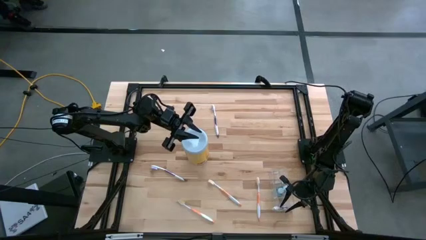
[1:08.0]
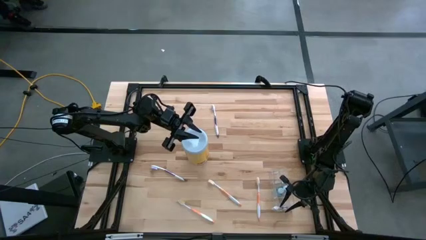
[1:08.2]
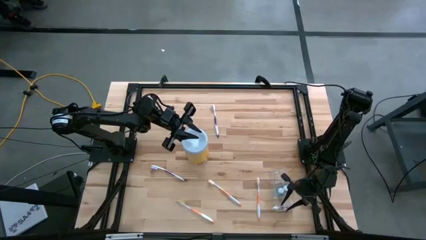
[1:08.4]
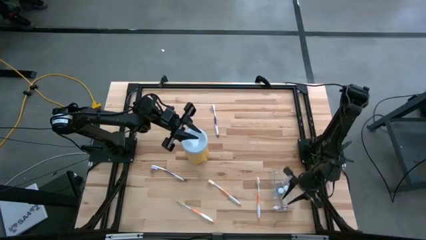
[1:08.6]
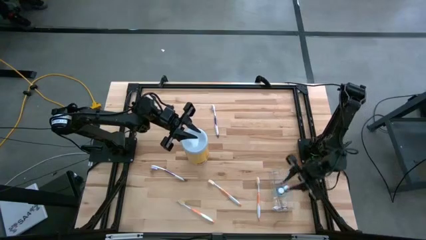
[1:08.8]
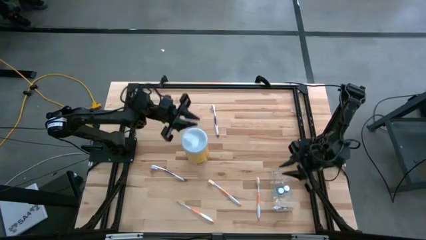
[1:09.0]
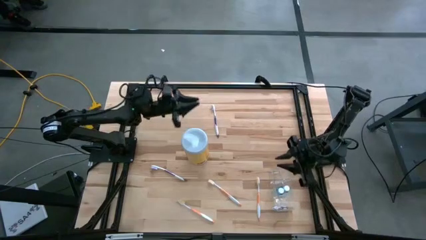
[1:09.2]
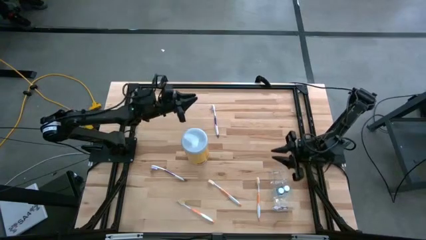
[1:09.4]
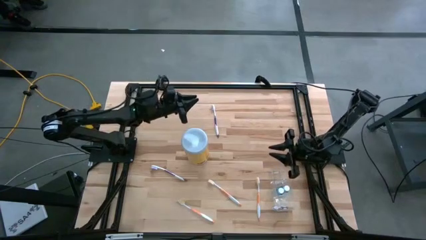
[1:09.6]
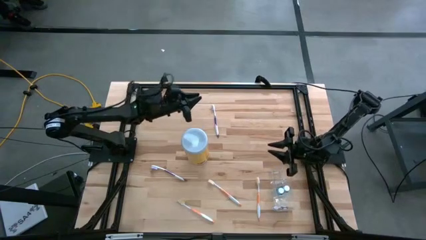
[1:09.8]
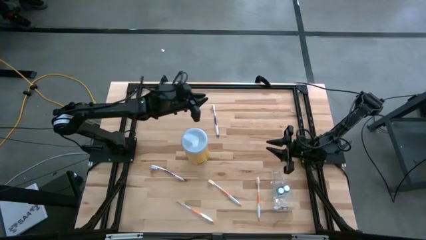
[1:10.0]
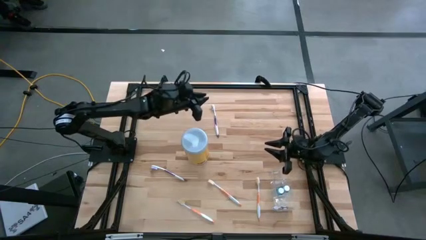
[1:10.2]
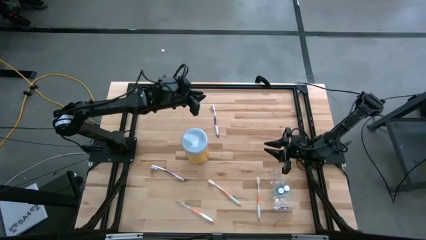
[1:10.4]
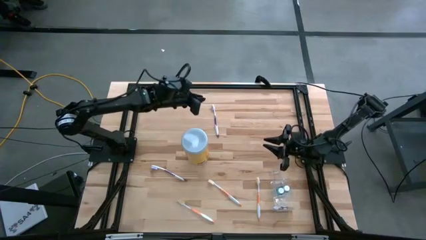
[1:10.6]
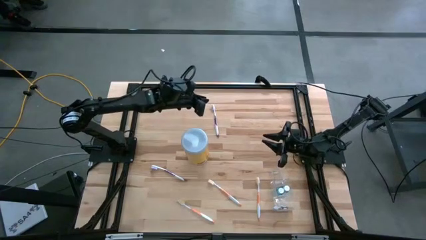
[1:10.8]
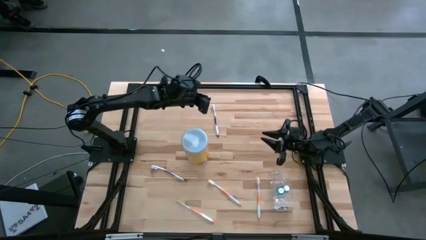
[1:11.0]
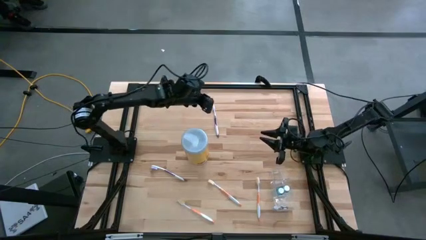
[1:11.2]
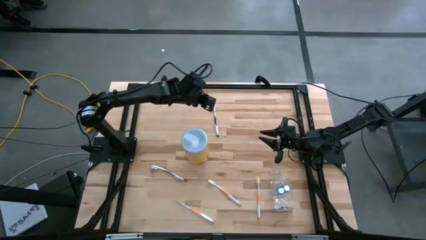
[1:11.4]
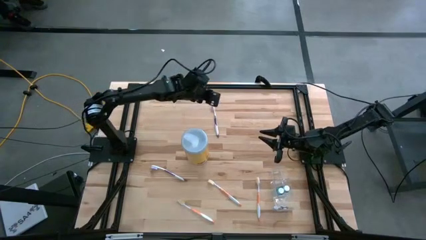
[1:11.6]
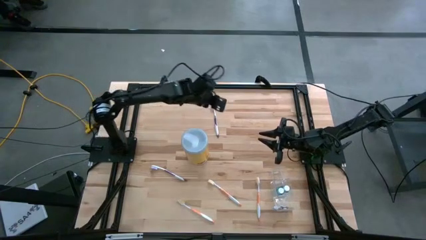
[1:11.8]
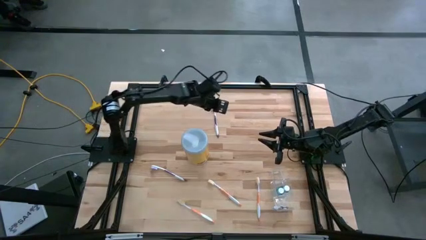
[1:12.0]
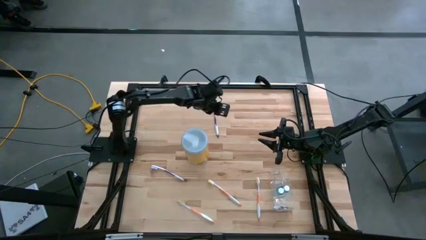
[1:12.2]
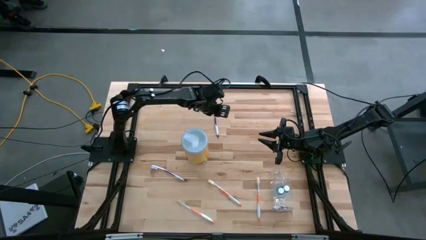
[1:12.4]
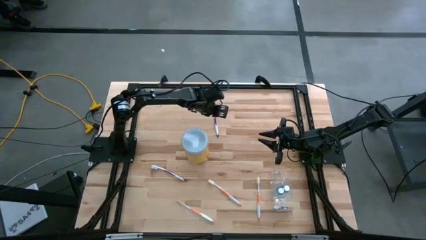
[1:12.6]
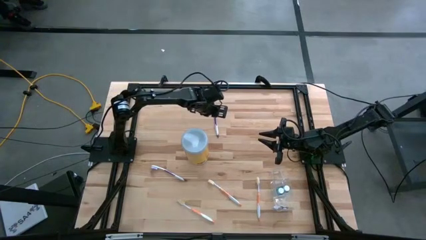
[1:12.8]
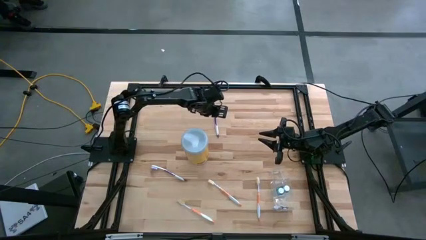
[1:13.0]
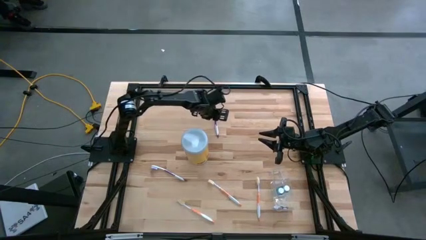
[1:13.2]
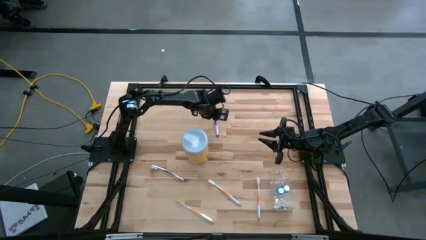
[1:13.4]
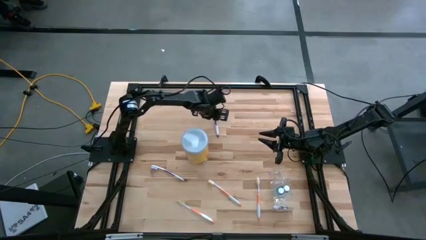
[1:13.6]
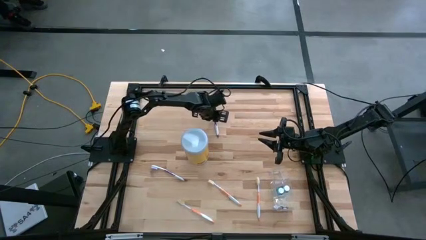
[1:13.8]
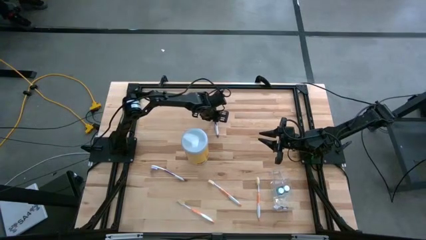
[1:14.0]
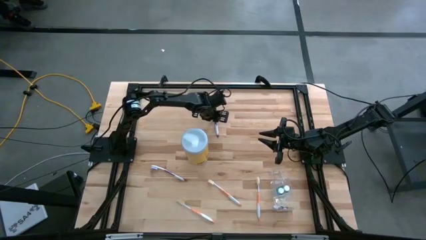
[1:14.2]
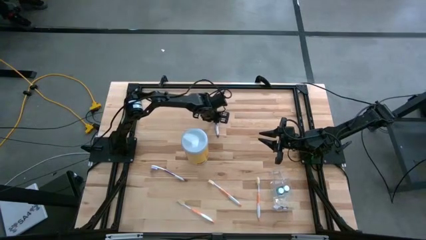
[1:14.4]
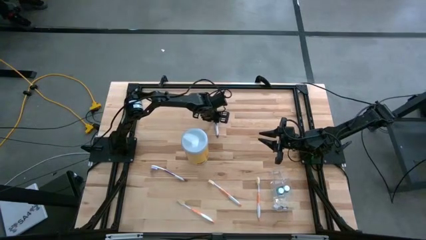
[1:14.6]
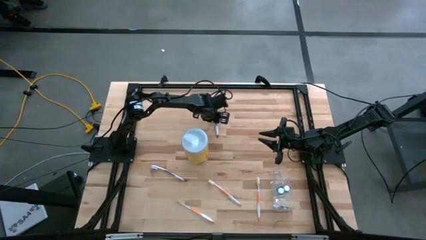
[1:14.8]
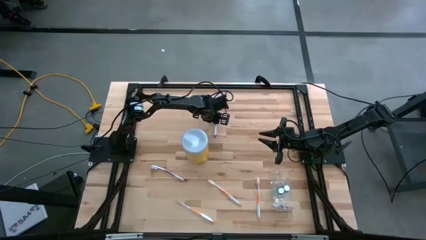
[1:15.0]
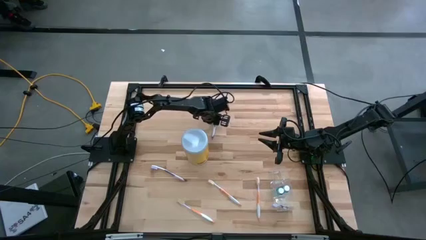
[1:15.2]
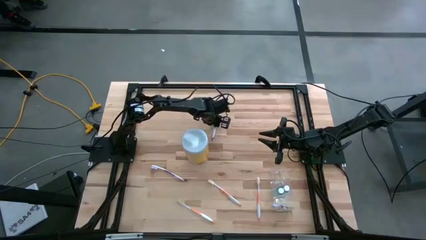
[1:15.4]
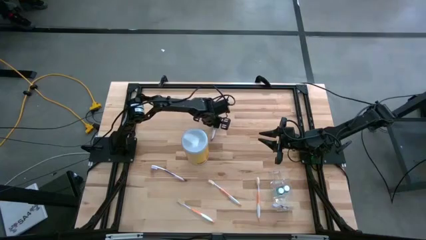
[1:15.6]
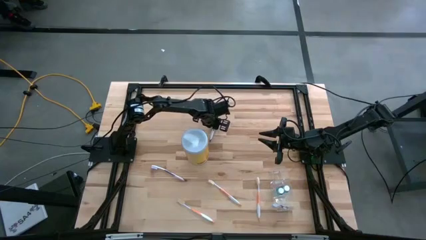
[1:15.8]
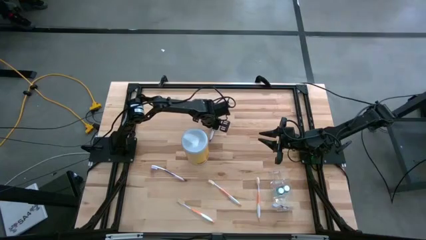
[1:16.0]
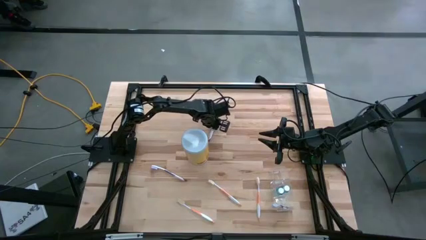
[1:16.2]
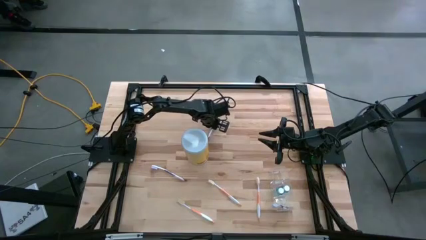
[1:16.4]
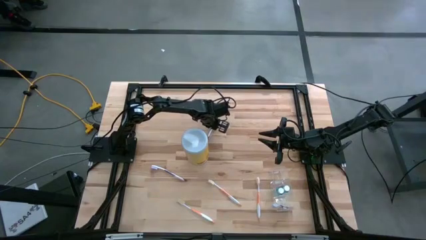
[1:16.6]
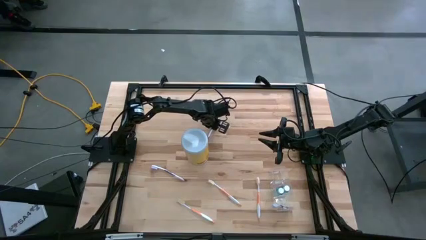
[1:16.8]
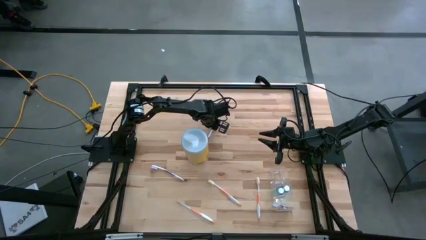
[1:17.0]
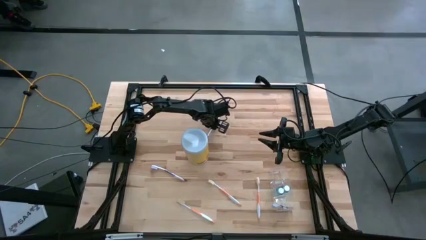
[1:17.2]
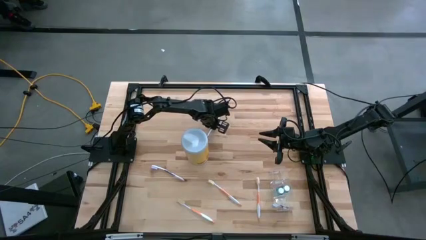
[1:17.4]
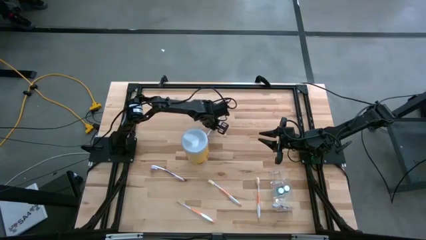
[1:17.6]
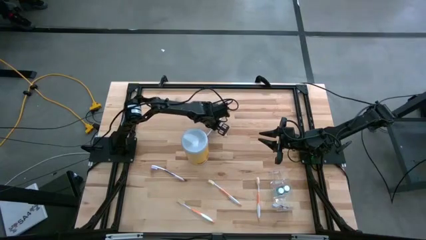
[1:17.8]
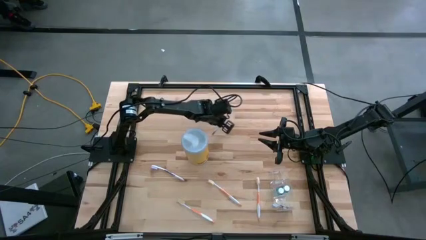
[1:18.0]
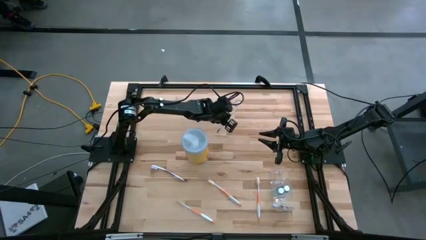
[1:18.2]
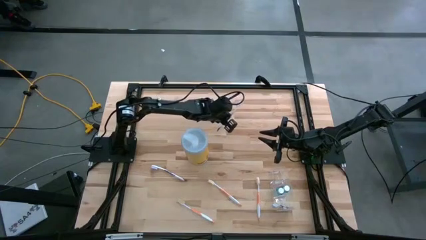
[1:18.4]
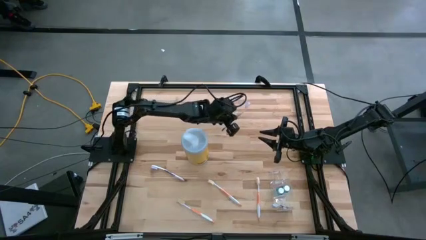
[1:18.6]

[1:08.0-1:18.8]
Task: Pick & Place toothbrushing station
Put the top purple toothbrush in the bottom section of the transparent organizer

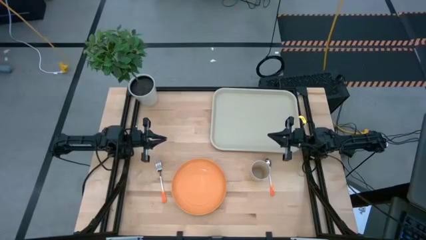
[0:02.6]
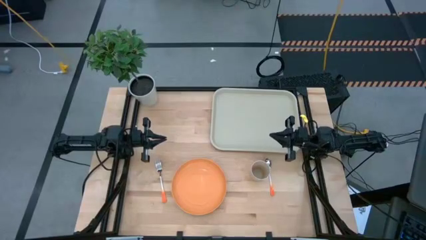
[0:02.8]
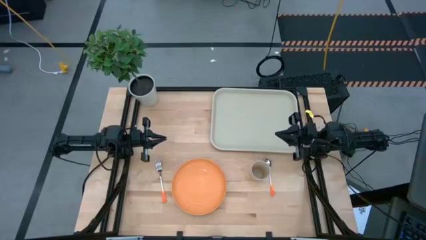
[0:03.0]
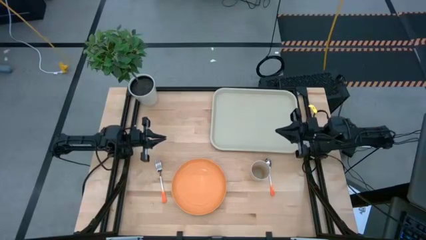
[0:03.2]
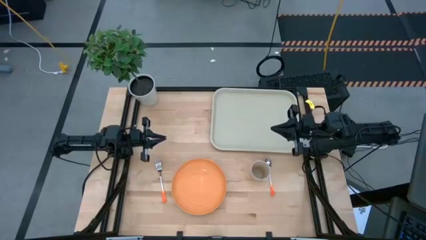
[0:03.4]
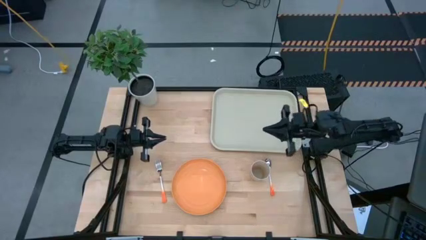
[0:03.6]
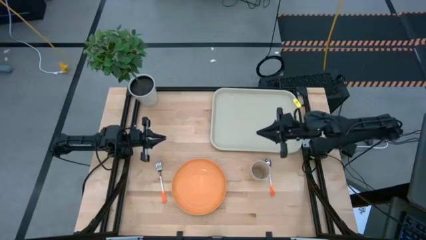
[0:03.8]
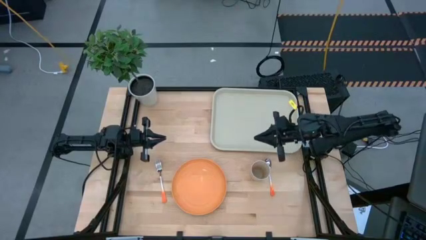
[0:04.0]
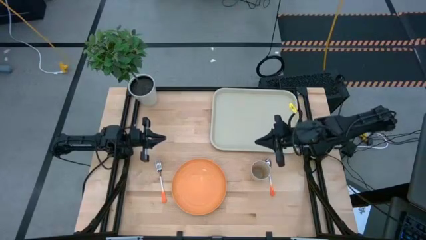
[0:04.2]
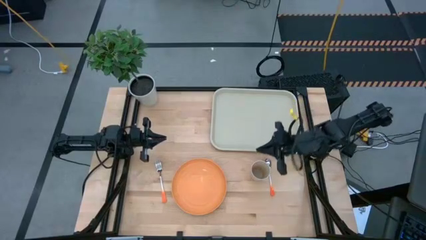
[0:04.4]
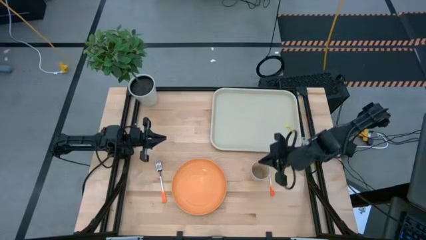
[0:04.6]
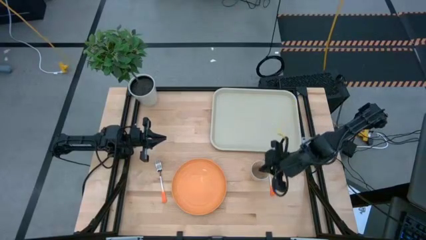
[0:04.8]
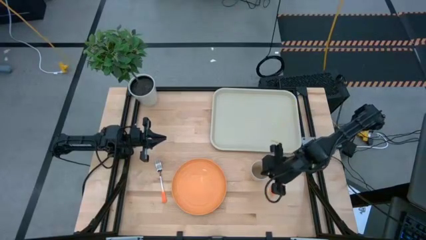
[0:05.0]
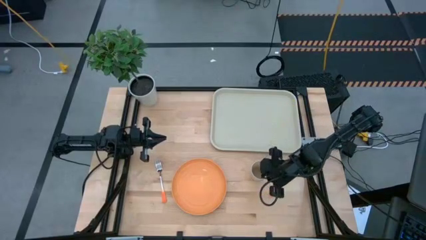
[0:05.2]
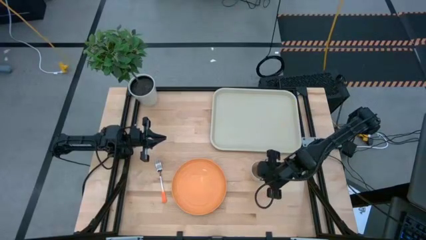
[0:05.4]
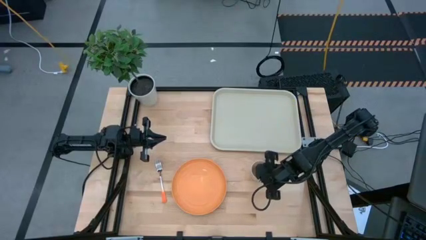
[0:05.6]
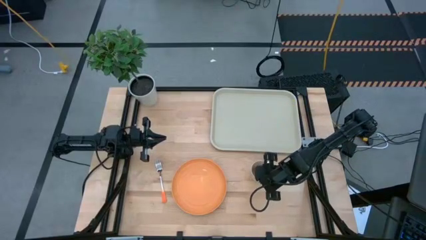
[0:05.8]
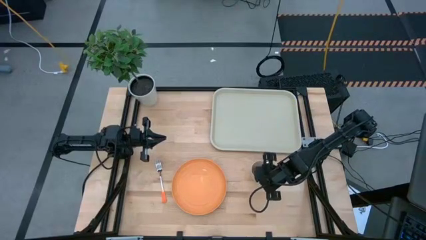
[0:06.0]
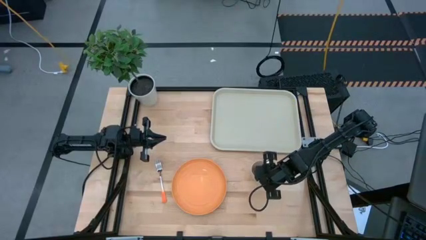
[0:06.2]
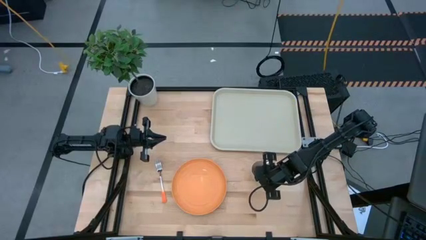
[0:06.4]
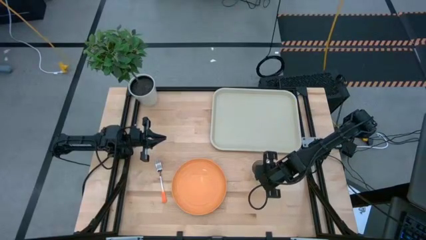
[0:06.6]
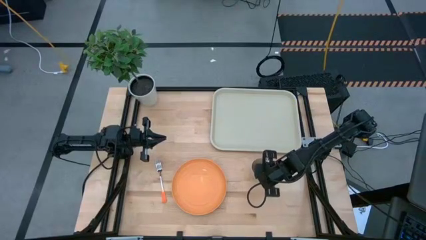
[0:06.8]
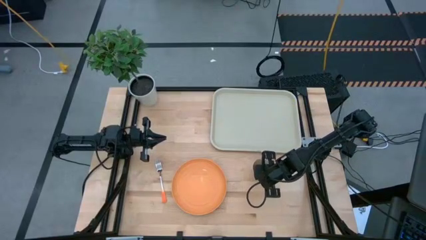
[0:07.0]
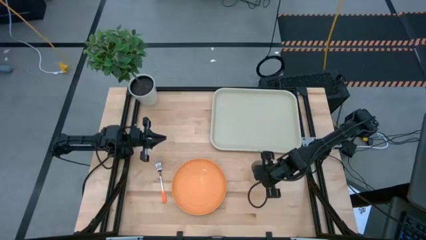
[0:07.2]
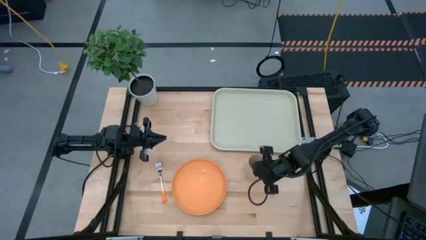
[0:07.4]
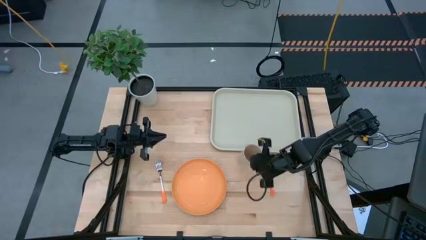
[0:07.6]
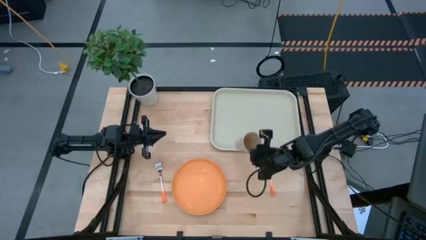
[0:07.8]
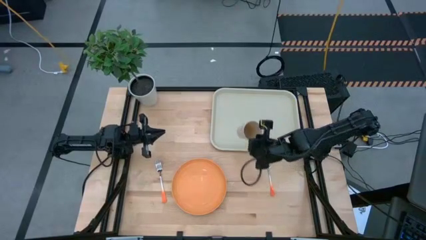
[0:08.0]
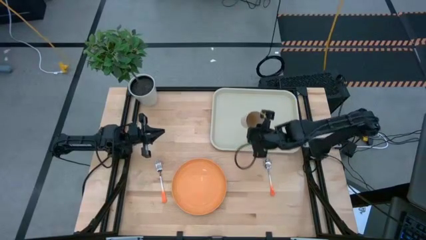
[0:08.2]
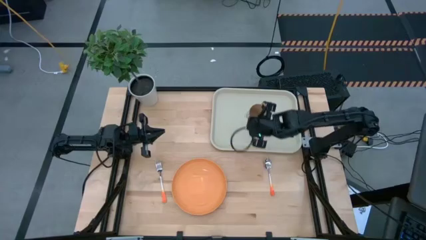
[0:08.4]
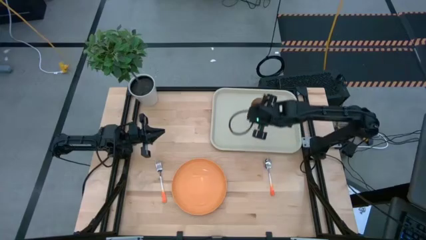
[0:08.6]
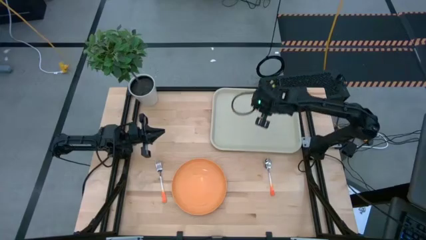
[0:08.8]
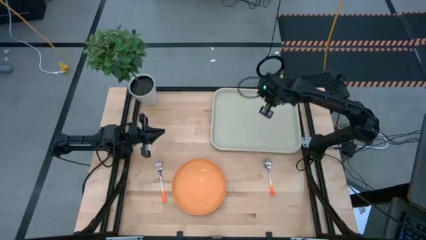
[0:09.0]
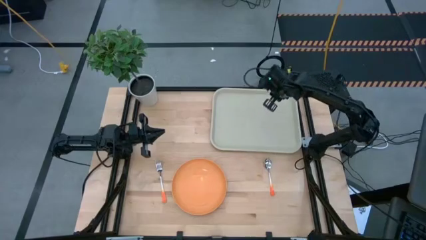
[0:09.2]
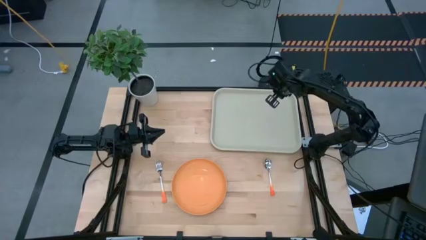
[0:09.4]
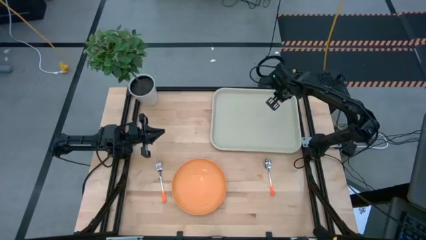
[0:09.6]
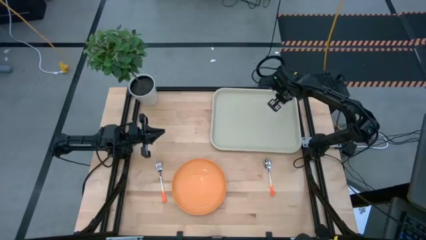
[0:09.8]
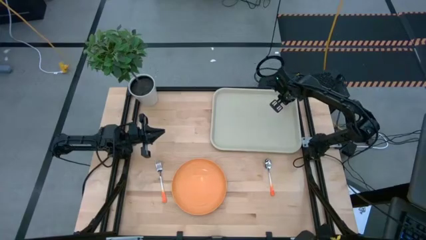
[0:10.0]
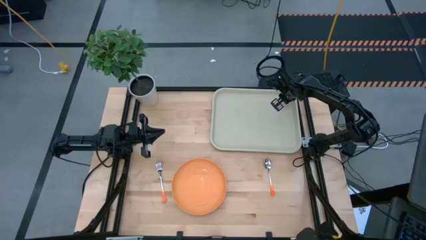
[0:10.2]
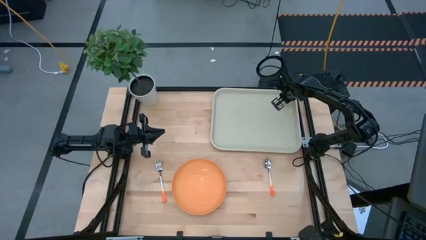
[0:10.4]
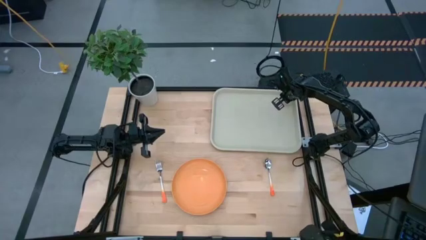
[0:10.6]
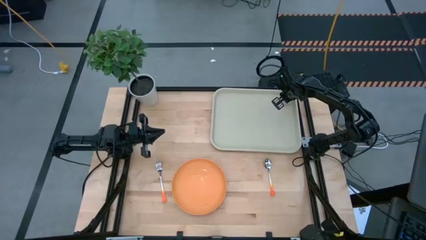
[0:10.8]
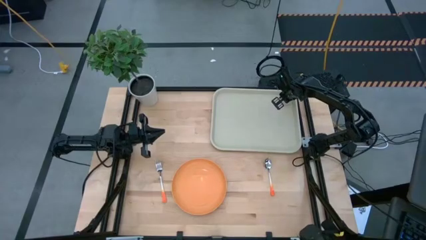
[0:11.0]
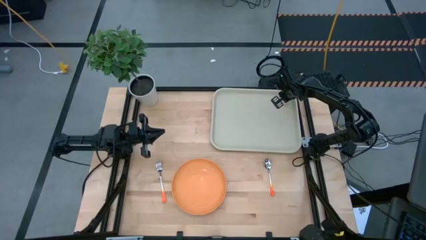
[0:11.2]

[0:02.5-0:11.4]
Task: Pick and place plate/cup/fork/spoon on tray
Put the white cup on the top right of the gray tray
